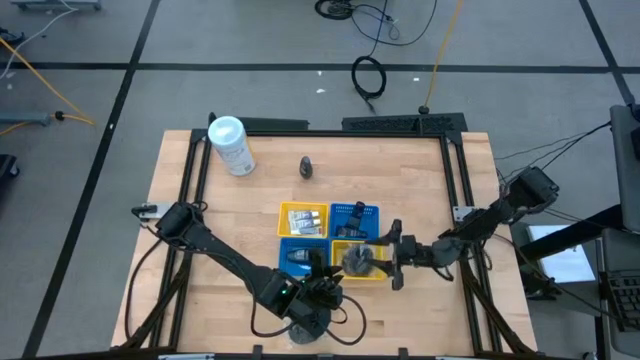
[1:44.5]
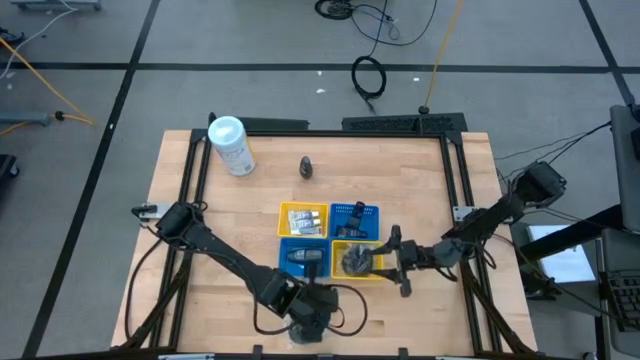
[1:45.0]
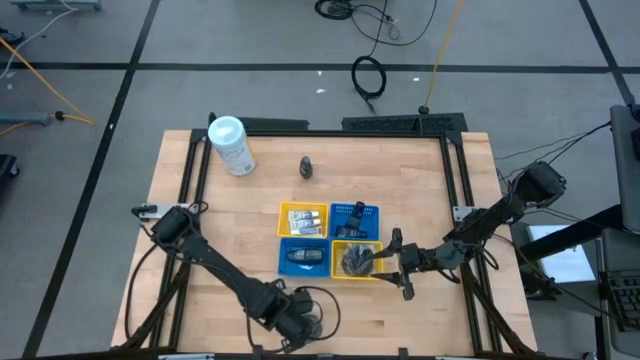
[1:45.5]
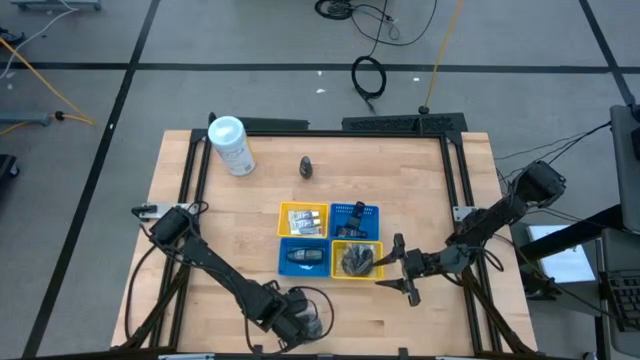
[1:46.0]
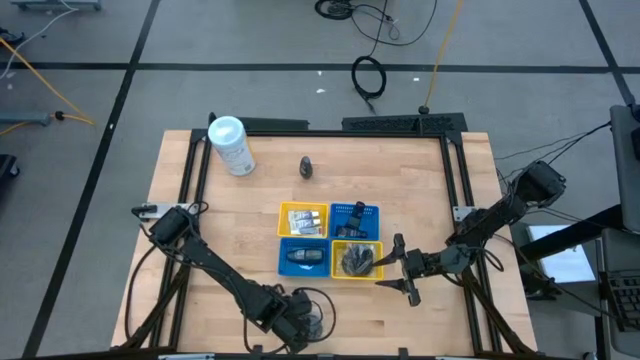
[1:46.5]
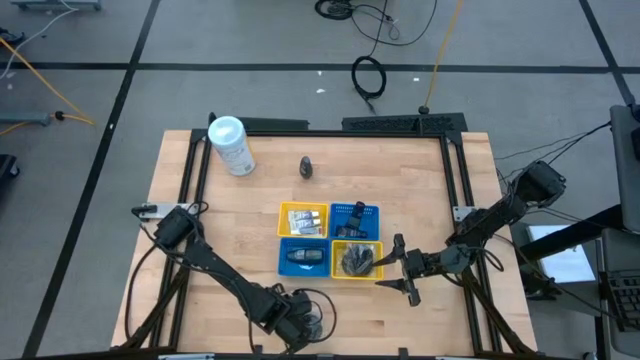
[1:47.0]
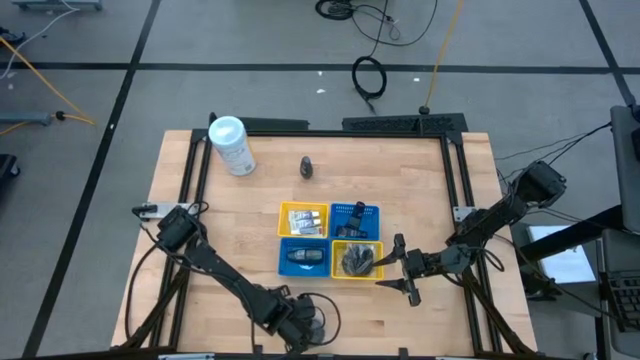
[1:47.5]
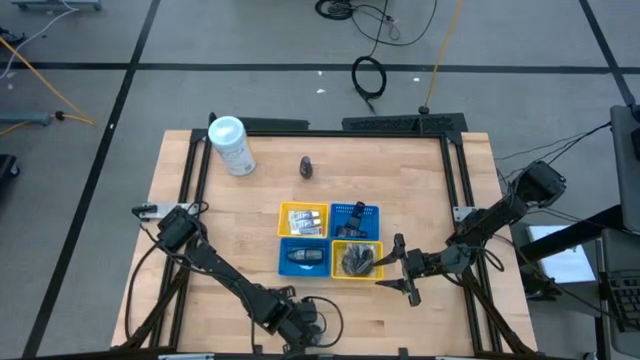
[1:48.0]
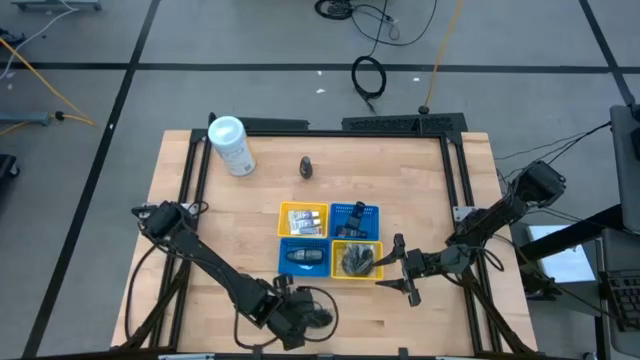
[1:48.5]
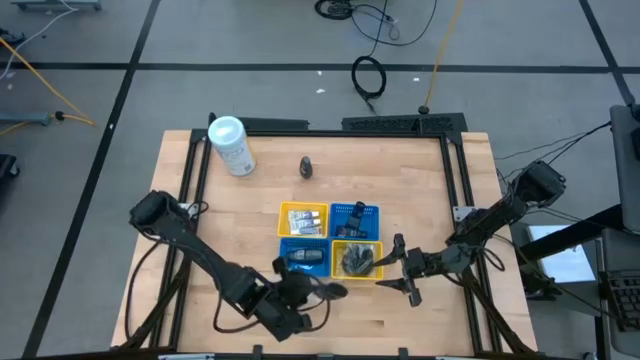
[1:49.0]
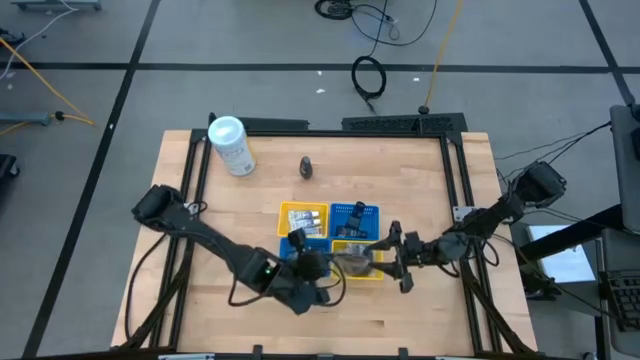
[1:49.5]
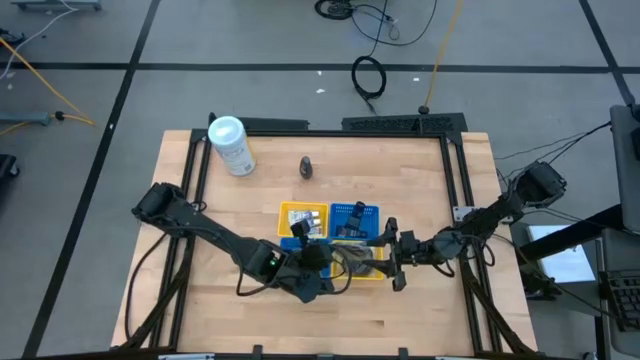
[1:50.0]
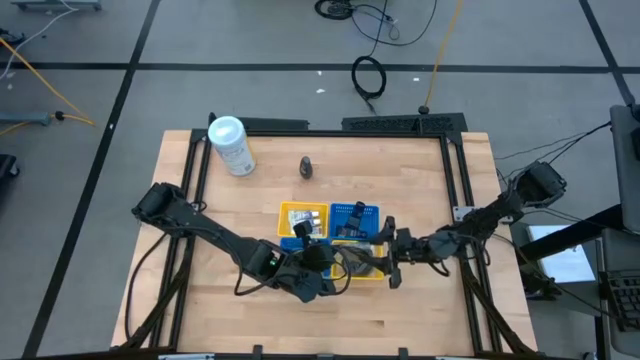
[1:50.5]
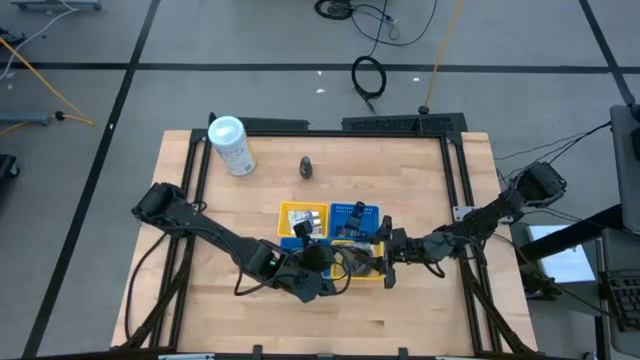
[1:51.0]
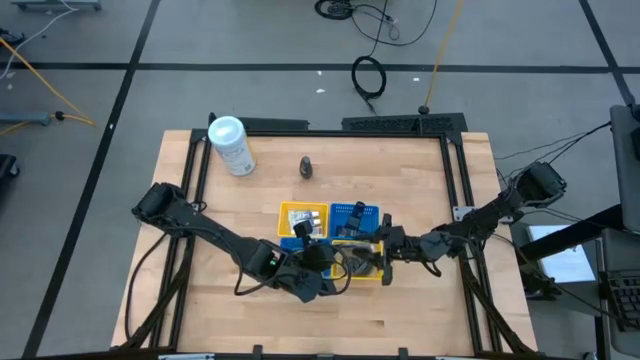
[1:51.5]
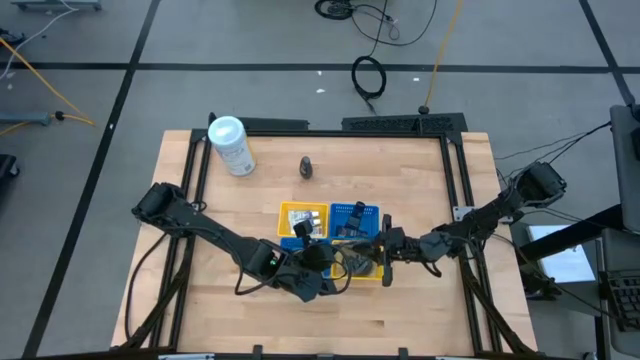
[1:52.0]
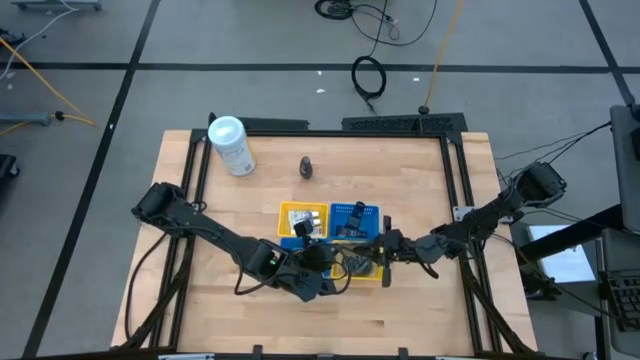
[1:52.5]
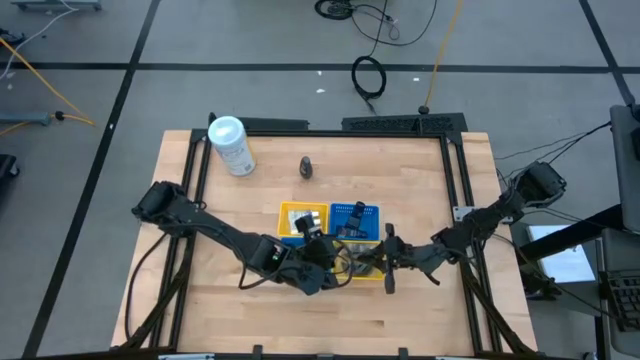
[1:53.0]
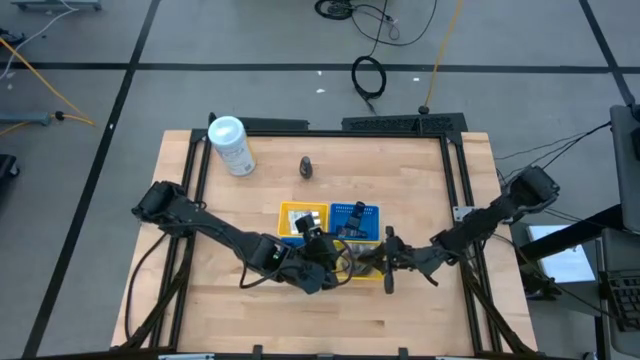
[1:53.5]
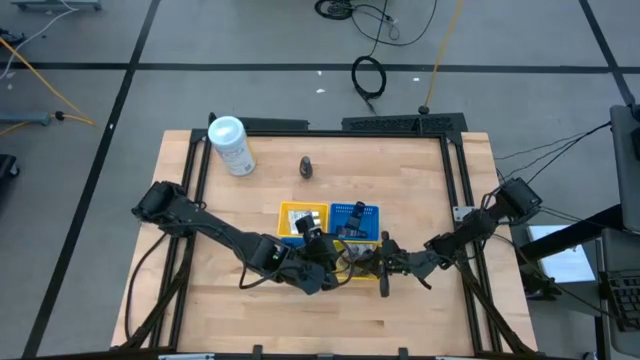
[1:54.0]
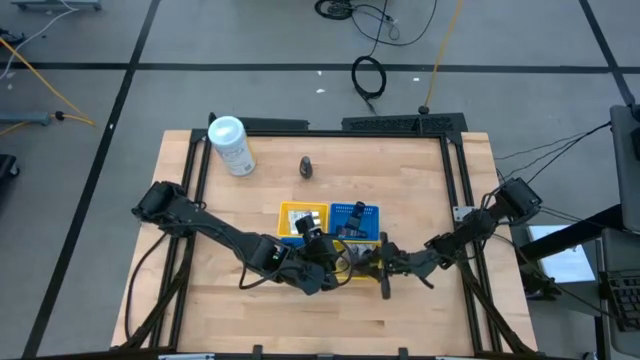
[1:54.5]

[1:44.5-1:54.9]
Task: Pick & Place Travel size toiletries
Put the black hairbrush into the right yellow bin

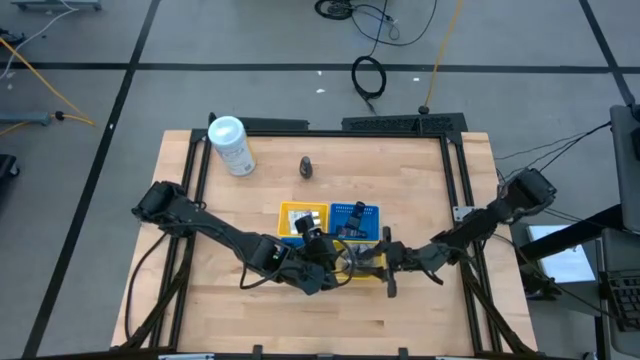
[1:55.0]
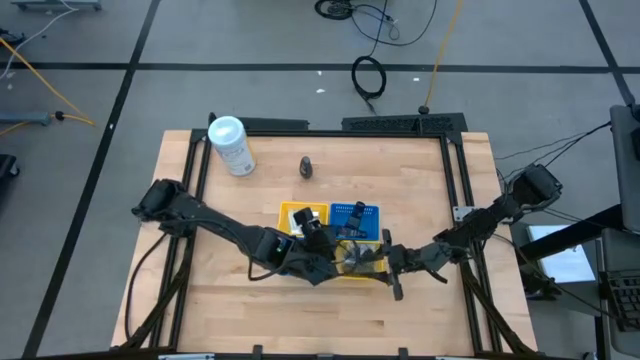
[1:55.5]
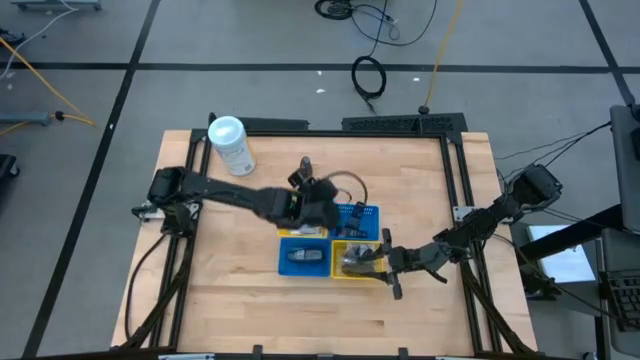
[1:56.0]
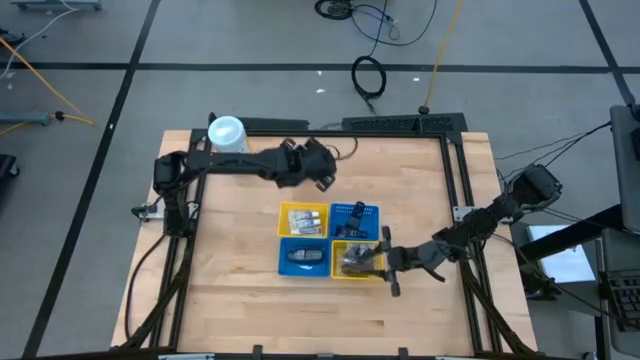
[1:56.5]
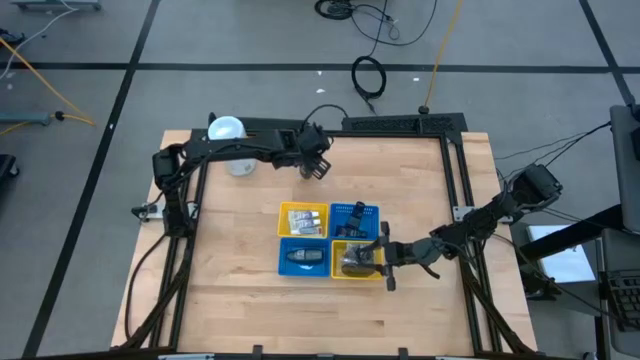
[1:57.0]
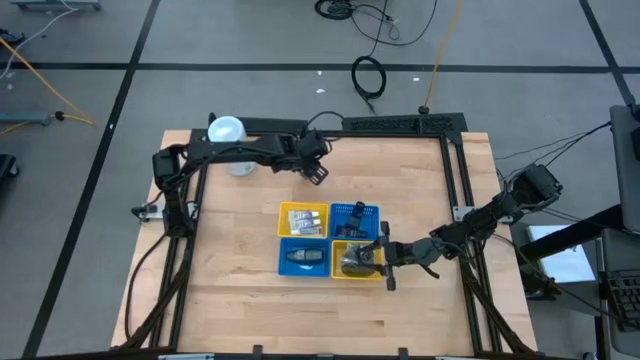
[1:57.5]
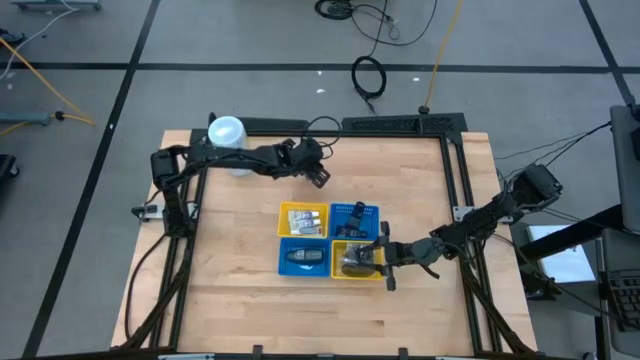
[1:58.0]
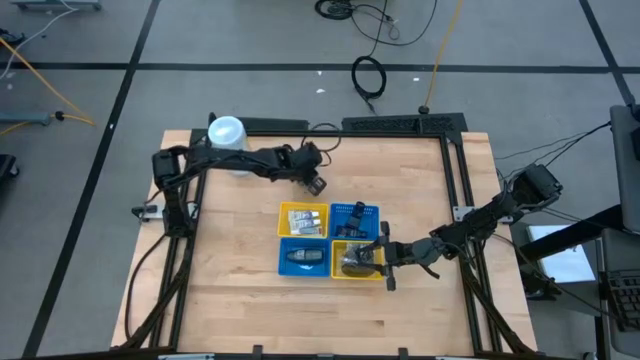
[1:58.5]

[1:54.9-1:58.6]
Put the gray deodorant into the left blue bin

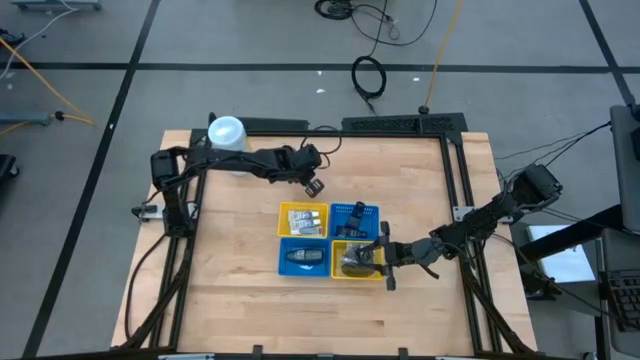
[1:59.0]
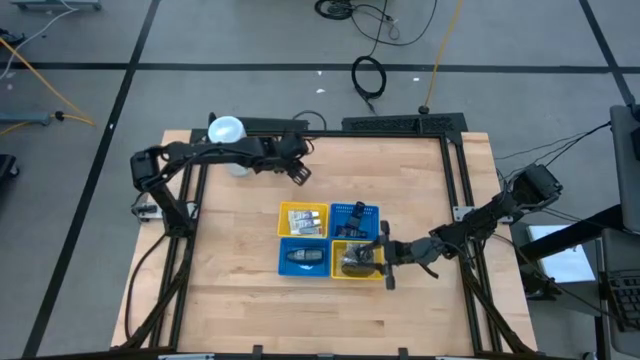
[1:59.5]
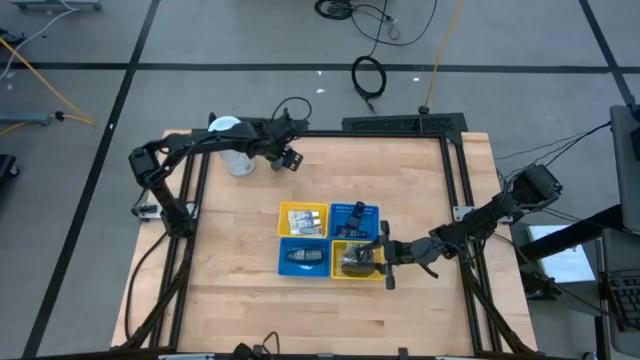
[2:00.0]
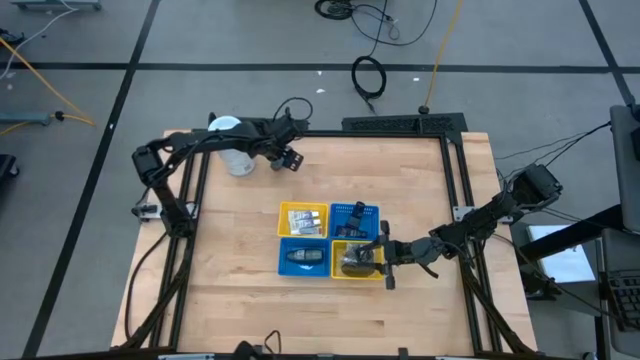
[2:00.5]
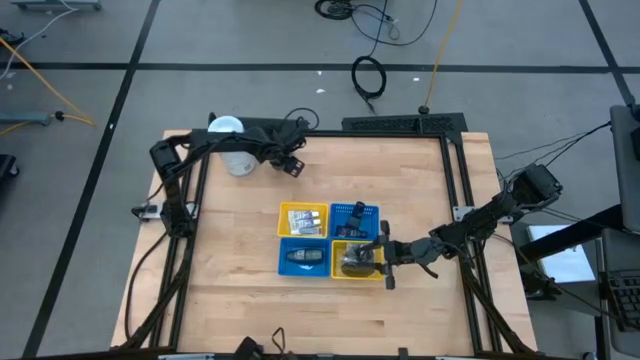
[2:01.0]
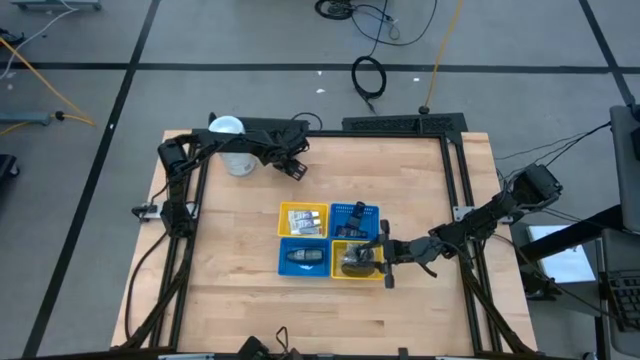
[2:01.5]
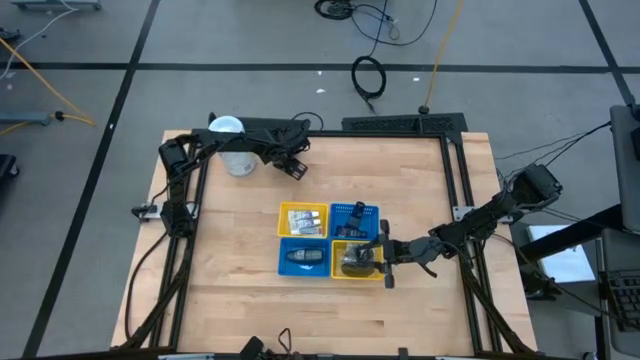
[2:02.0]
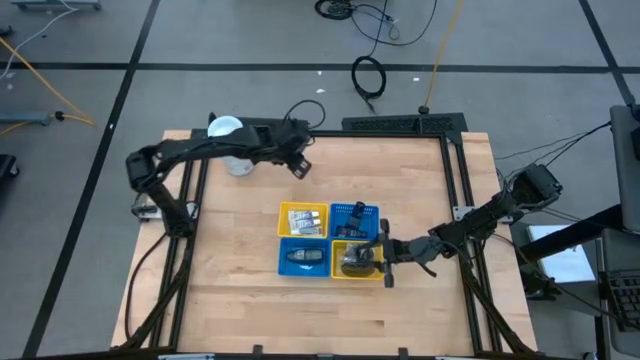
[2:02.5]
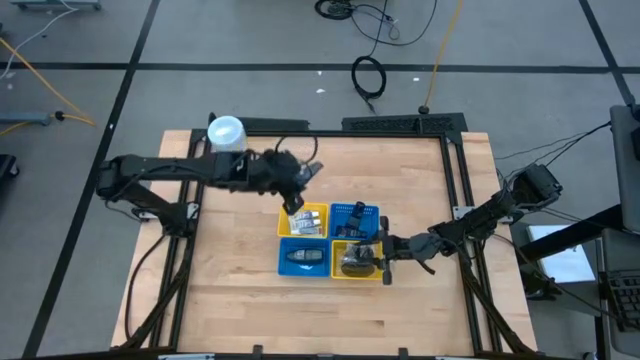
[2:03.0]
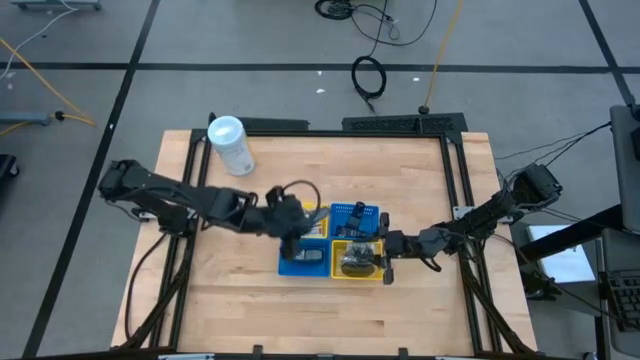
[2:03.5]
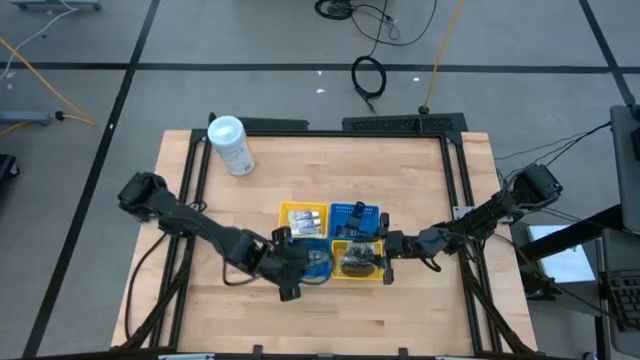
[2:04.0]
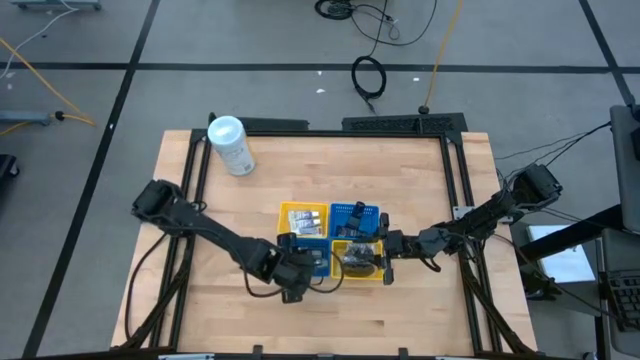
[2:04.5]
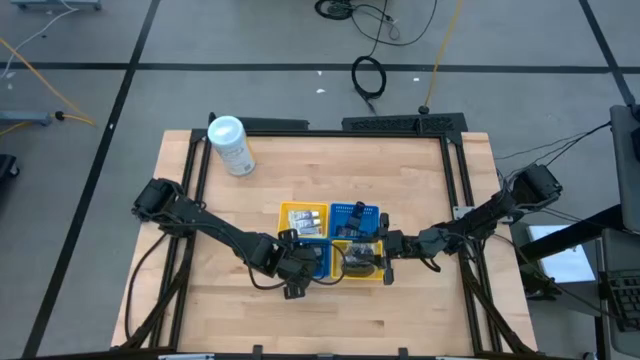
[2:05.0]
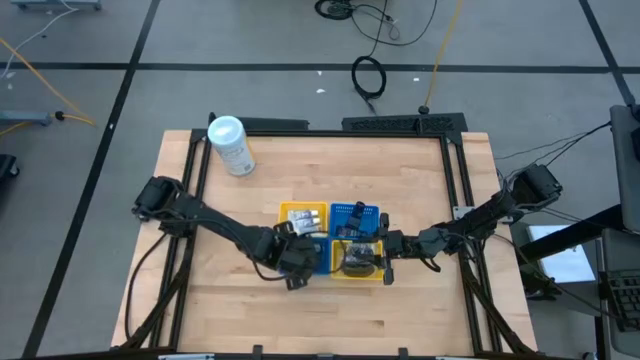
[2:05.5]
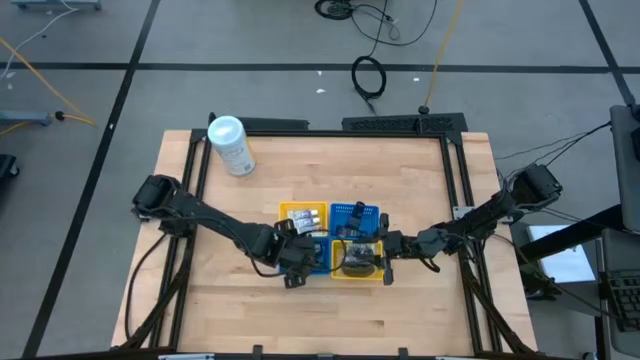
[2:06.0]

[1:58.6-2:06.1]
Put the gray deodorant into the left blue bin
